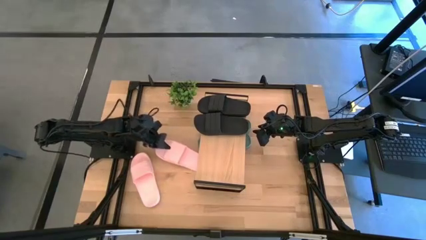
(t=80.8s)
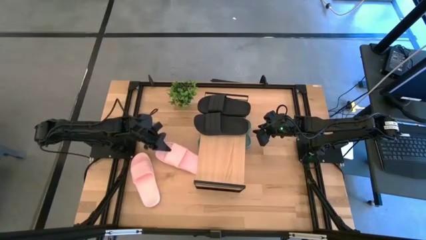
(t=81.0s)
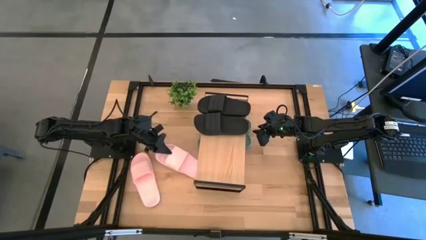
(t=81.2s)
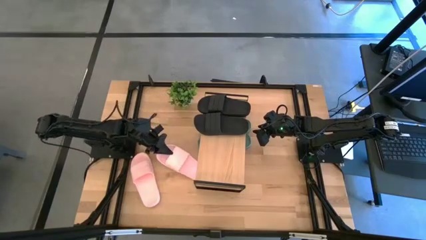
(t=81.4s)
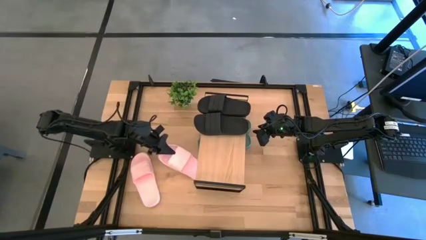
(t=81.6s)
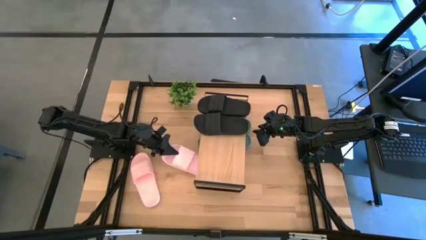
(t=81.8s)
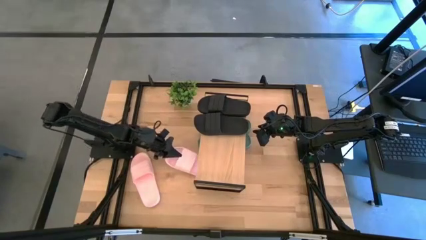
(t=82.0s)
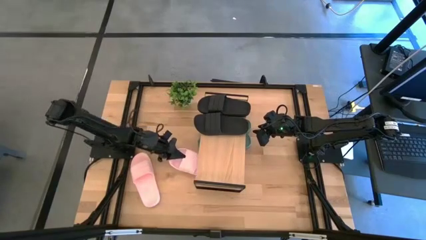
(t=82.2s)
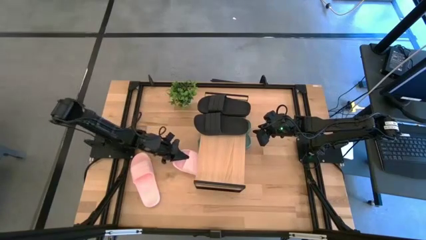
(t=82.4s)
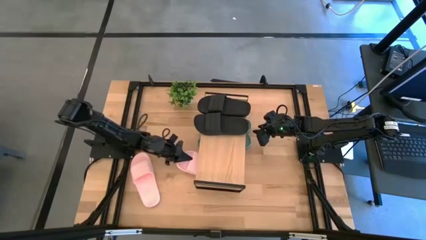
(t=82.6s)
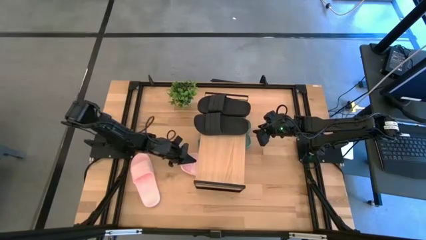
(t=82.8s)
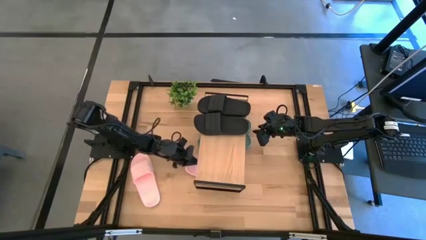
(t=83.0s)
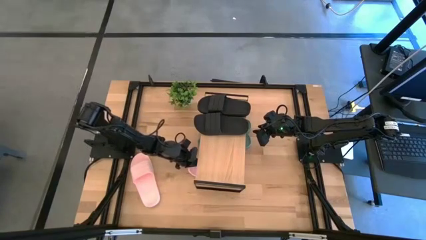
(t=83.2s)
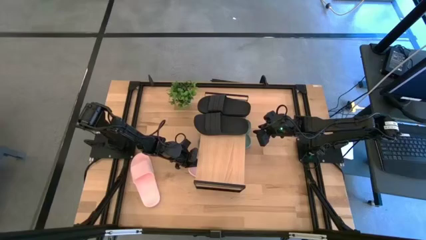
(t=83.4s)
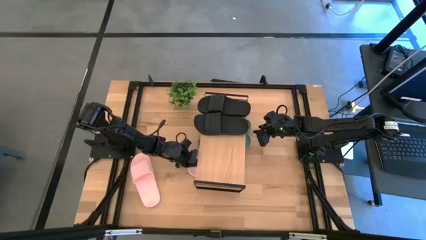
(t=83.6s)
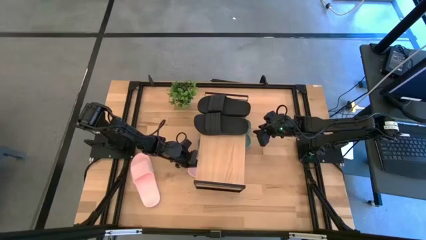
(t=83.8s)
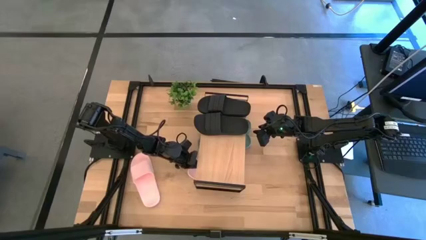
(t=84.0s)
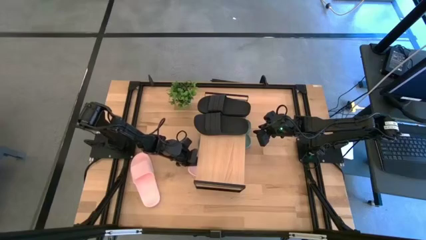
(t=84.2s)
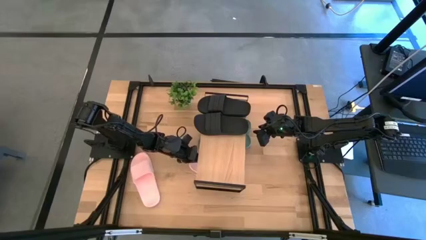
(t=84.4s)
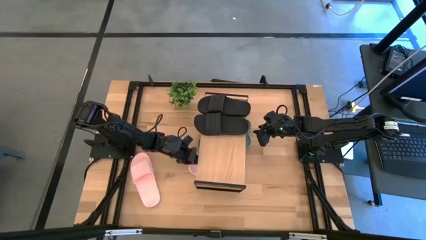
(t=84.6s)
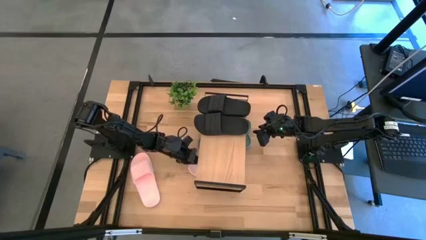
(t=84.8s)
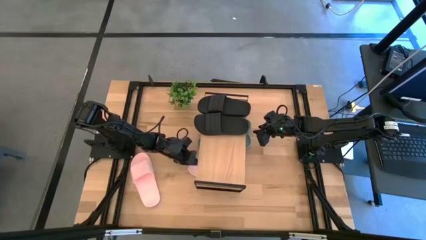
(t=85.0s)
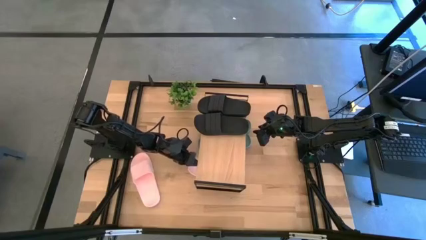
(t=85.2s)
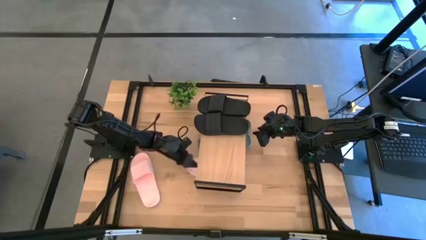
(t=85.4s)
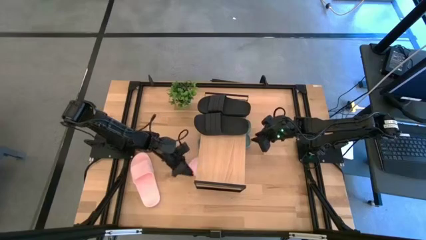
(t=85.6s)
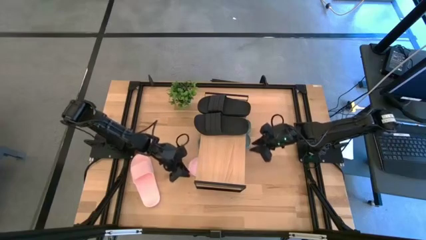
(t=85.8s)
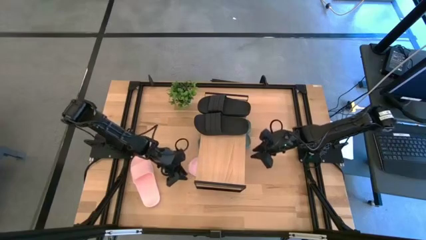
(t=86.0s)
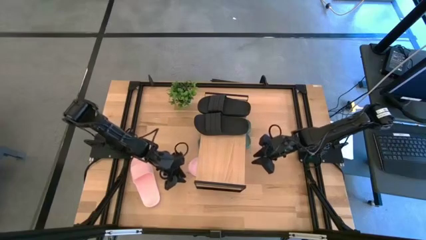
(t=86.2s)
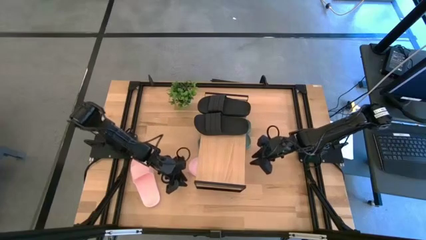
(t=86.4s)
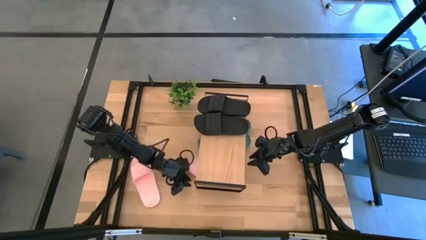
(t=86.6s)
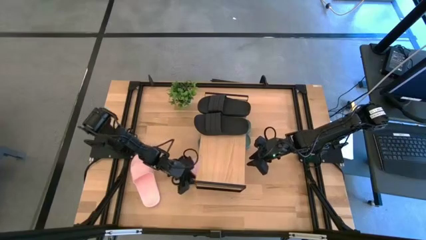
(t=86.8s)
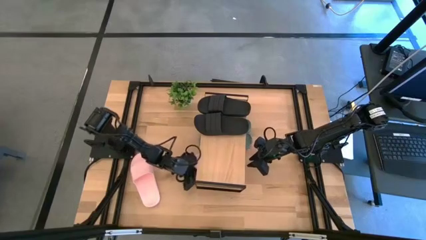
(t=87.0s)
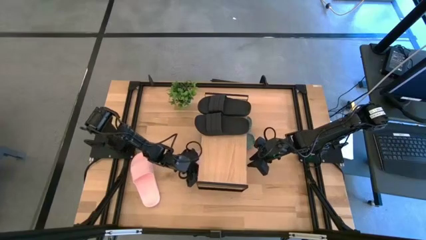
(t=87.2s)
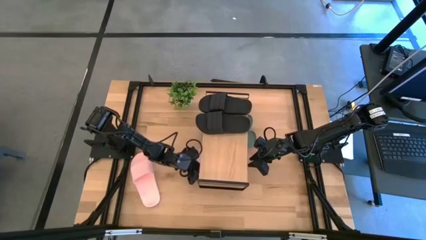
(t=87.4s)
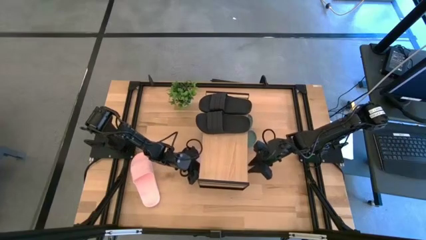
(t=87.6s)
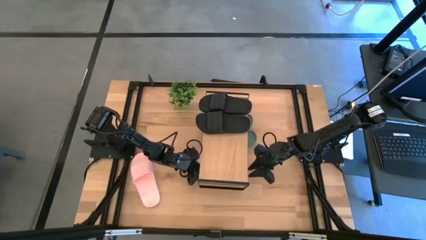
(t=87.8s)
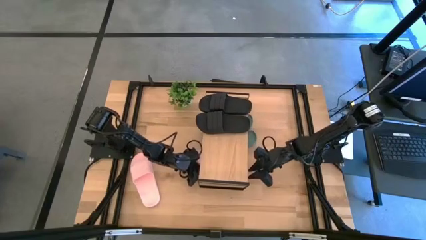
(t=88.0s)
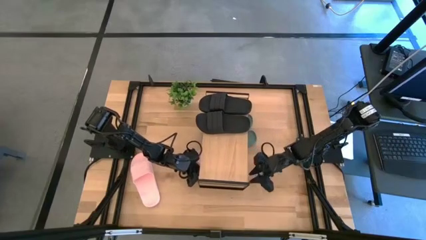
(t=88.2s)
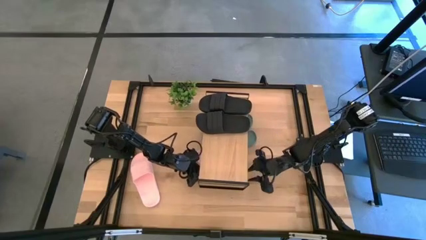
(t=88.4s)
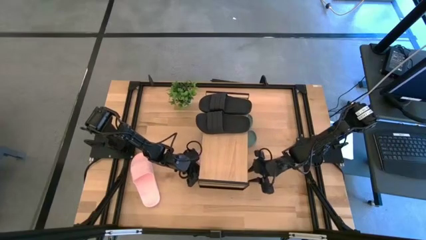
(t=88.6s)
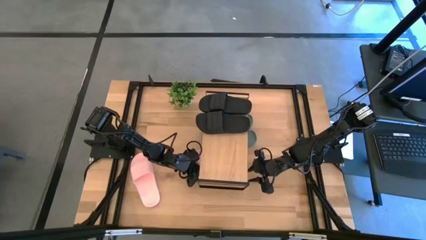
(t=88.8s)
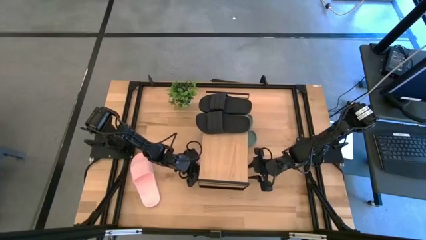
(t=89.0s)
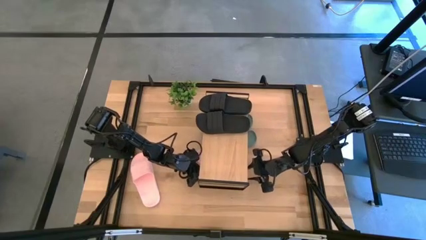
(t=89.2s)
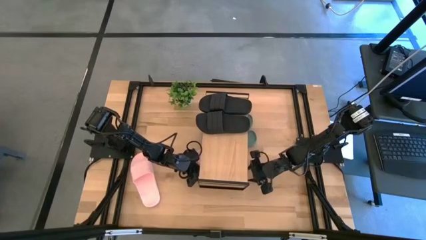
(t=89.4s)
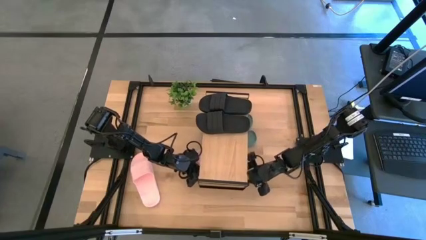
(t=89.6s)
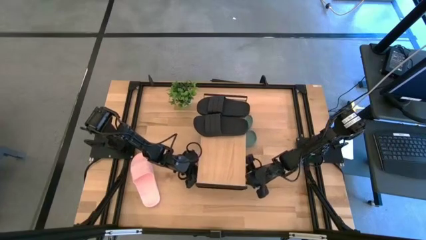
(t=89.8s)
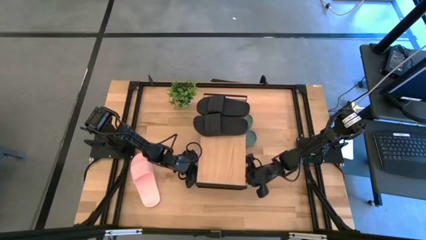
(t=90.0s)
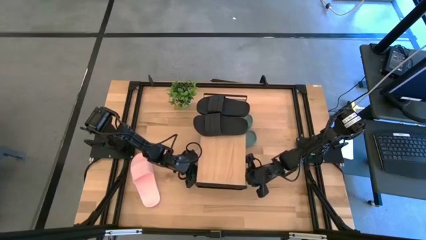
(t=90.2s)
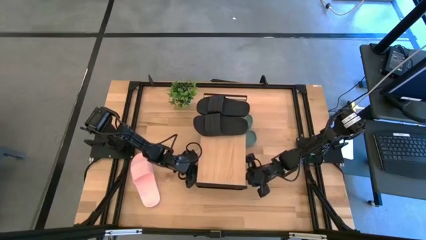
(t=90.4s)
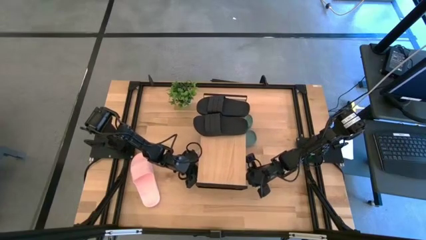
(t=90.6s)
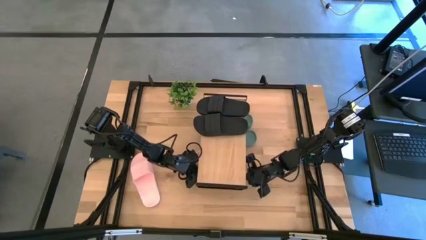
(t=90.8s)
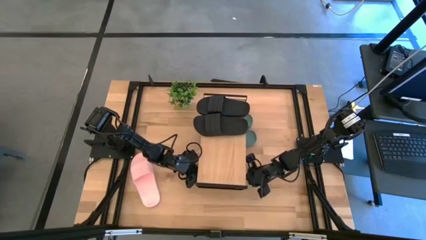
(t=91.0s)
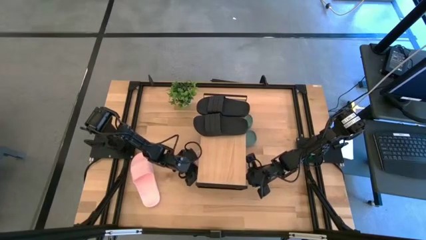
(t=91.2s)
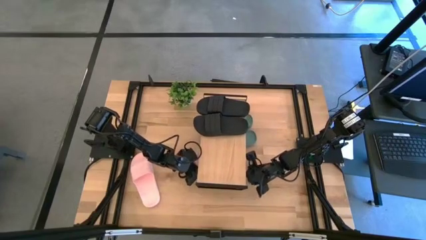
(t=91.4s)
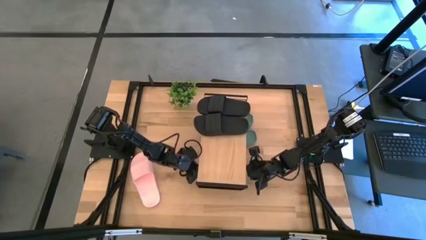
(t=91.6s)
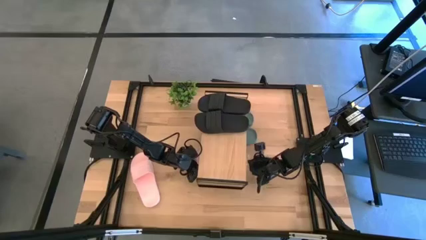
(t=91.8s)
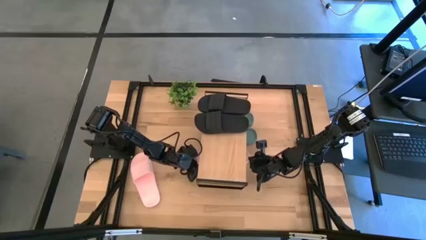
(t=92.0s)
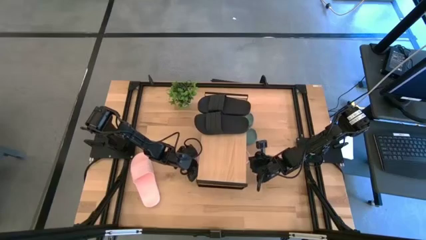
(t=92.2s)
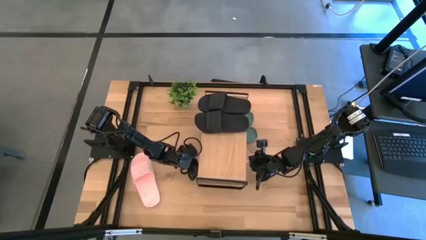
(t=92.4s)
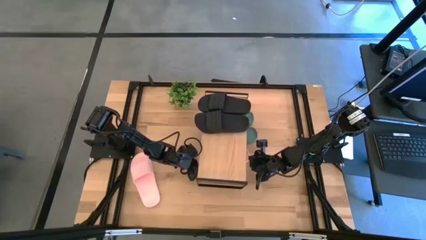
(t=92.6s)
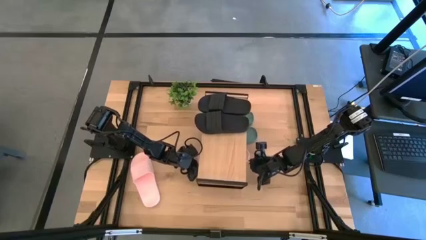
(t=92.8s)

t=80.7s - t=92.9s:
Task: Pick and place slides into the shelf
Put the right pink slide under the shelf

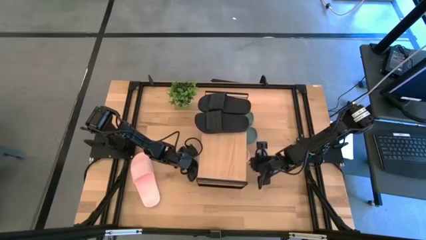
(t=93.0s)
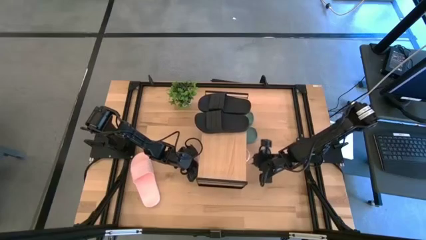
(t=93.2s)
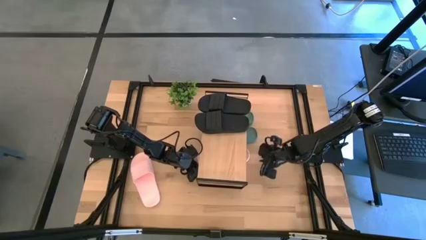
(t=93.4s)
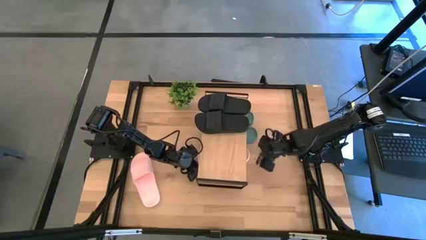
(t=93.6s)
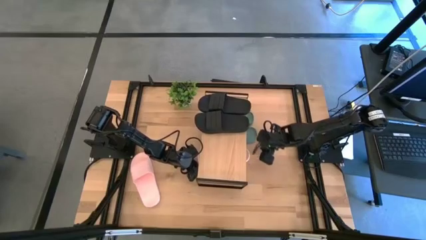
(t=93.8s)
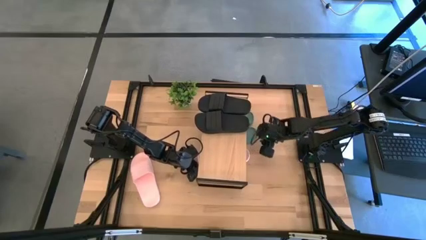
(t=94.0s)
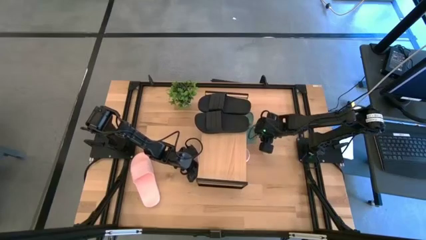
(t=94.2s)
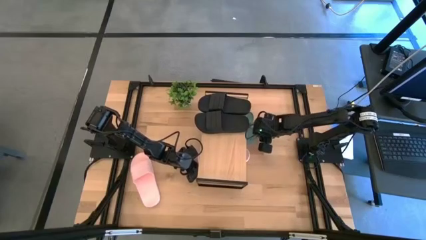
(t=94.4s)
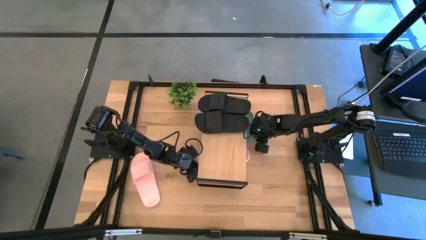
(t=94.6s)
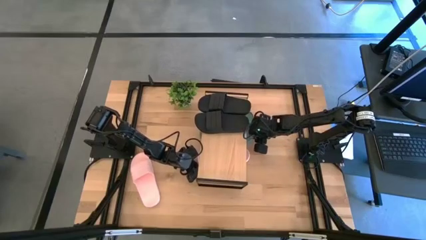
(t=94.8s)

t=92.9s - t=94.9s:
Adjust the green slide under the shelf

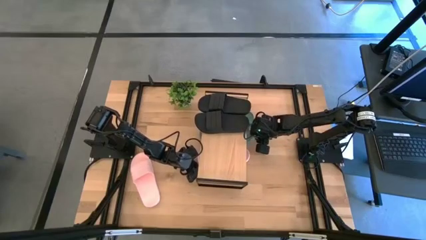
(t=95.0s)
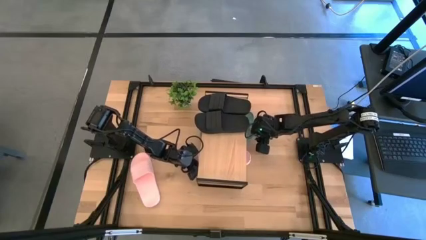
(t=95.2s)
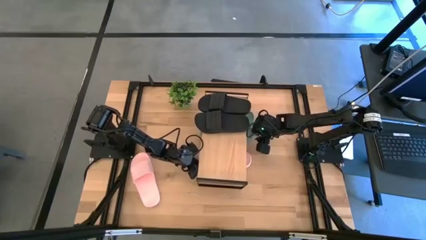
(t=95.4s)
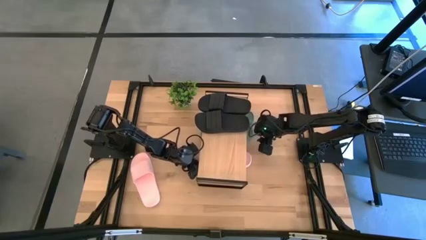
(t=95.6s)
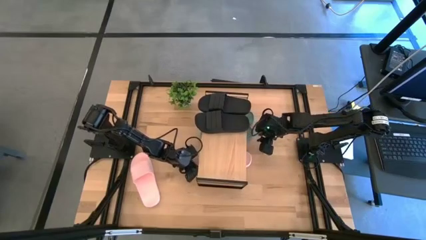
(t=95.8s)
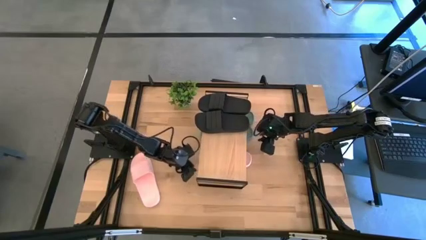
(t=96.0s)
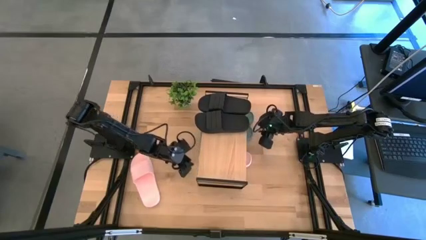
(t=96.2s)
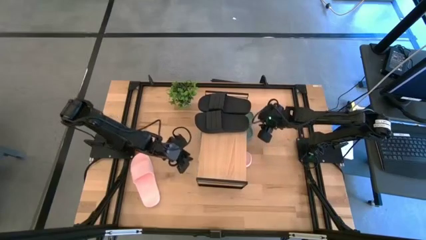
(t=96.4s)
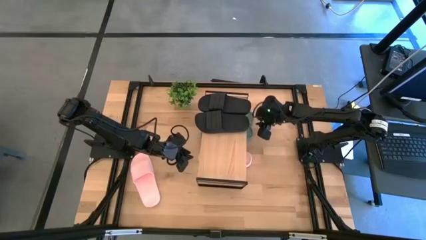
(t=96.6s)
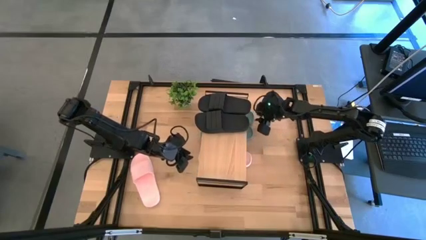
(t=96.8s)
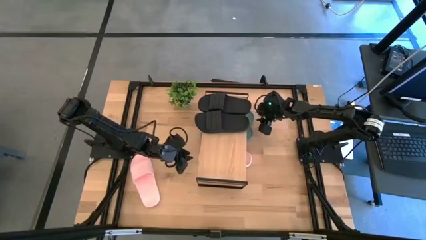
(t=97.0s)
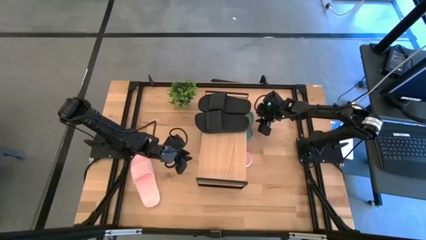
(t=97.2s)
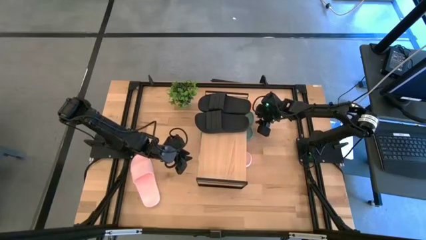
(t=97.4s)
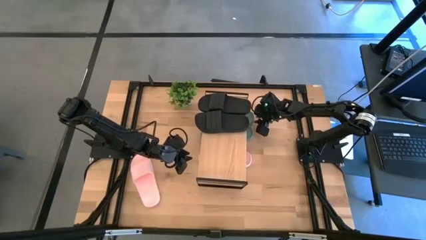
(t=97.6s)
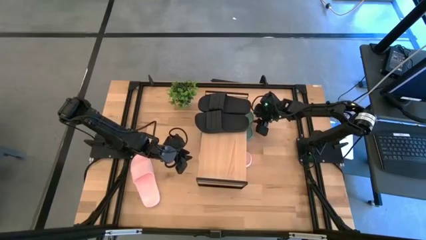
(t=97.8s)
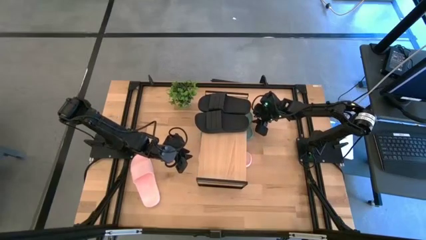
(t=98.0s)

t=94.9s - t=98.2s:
Adjust the green slide under the shelf
